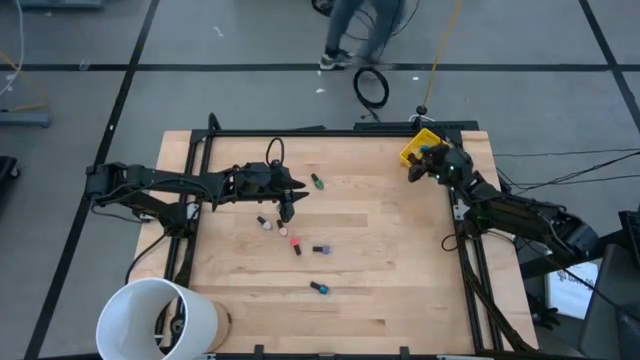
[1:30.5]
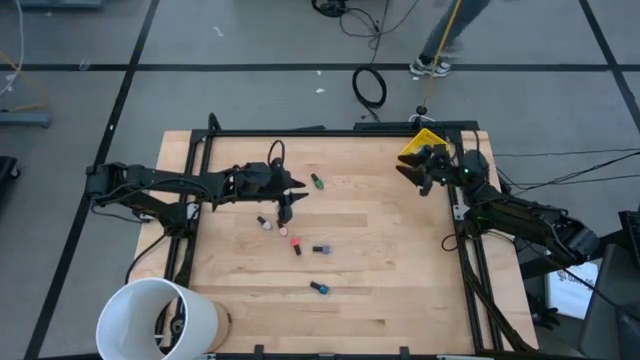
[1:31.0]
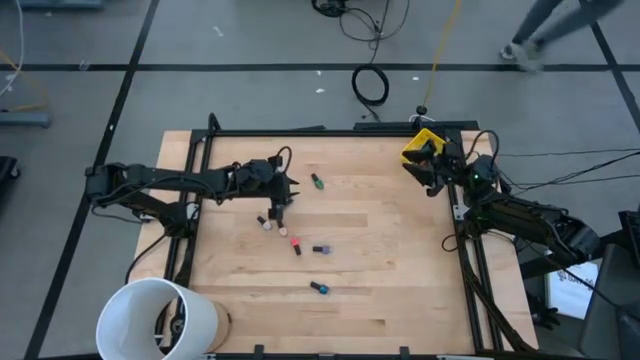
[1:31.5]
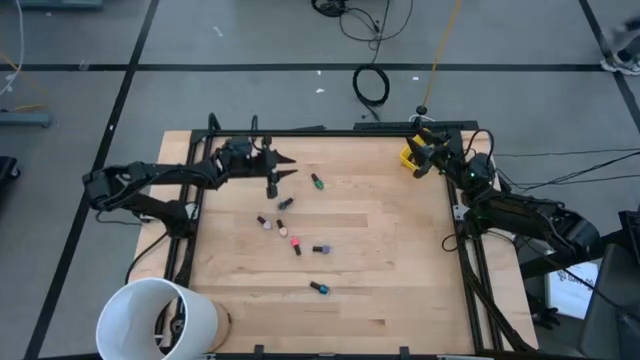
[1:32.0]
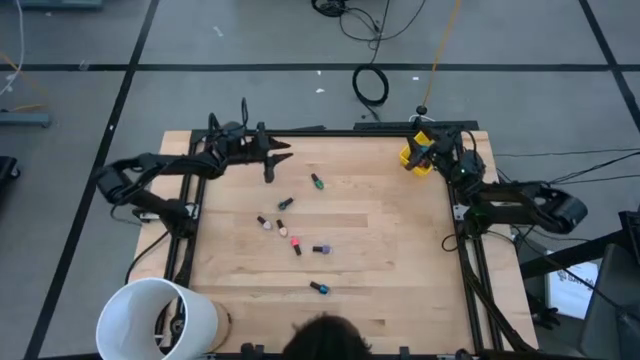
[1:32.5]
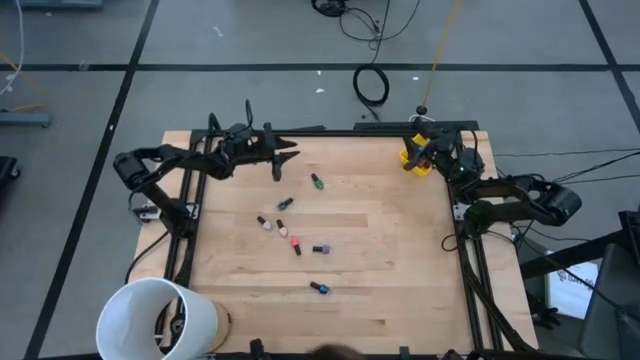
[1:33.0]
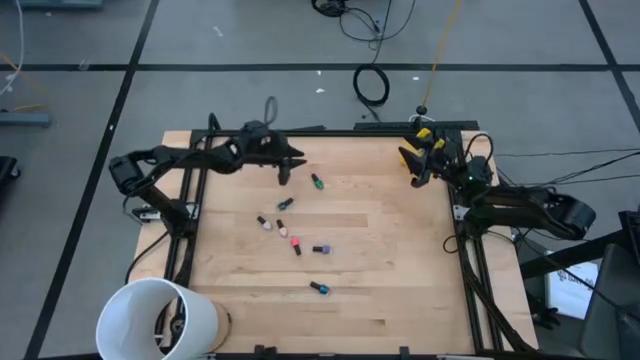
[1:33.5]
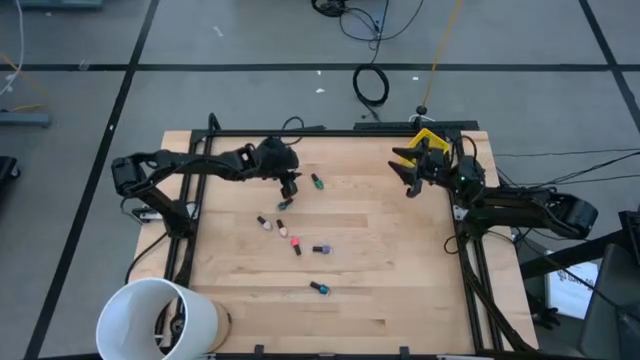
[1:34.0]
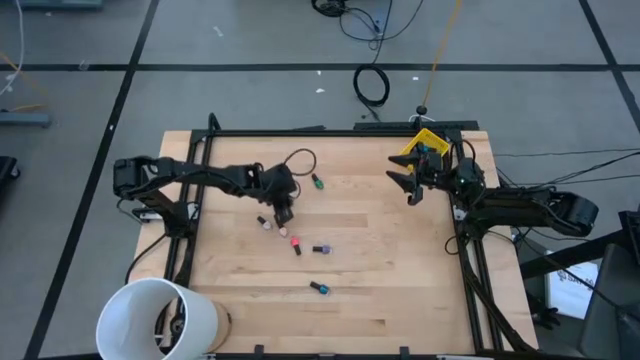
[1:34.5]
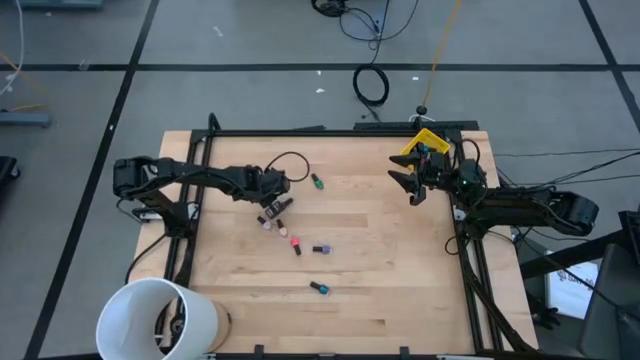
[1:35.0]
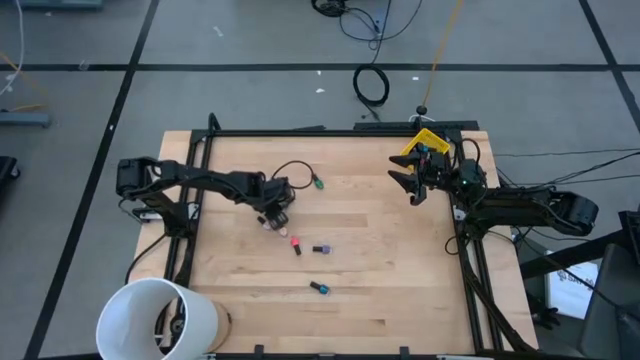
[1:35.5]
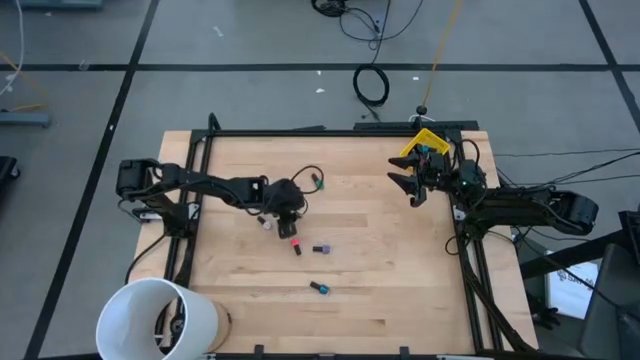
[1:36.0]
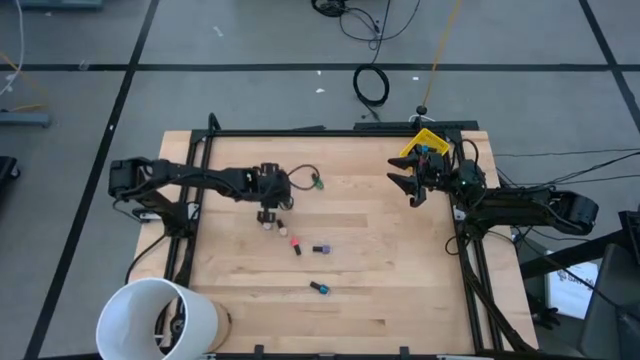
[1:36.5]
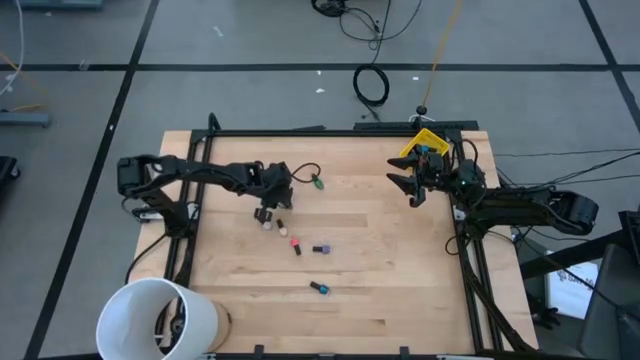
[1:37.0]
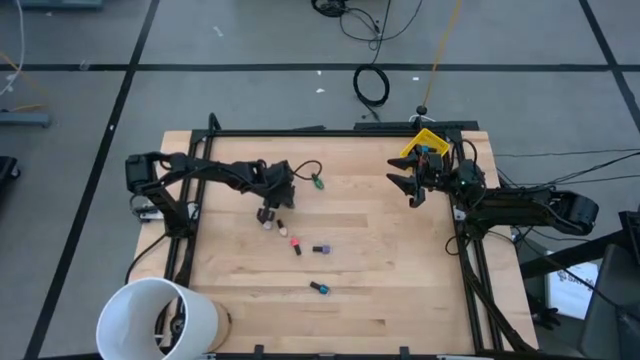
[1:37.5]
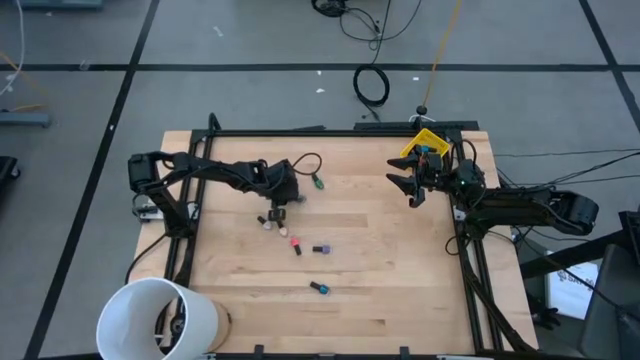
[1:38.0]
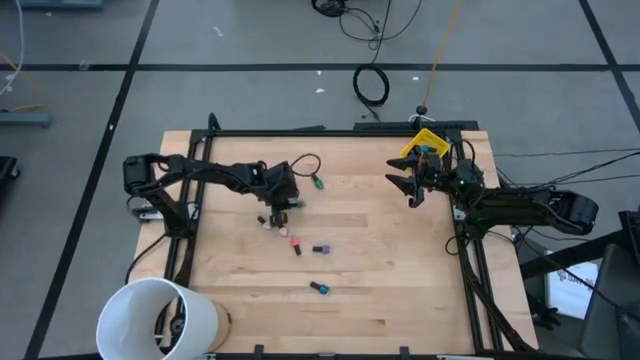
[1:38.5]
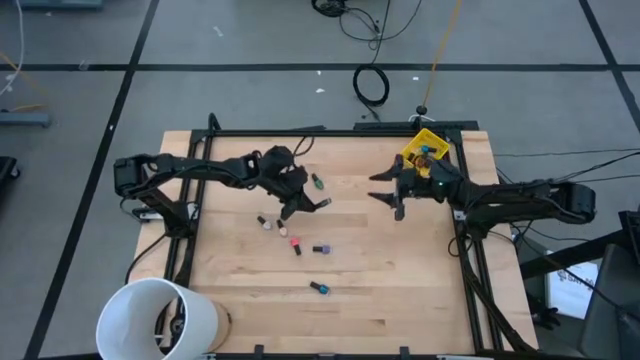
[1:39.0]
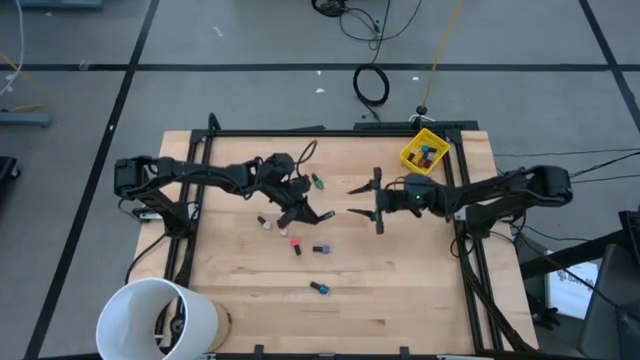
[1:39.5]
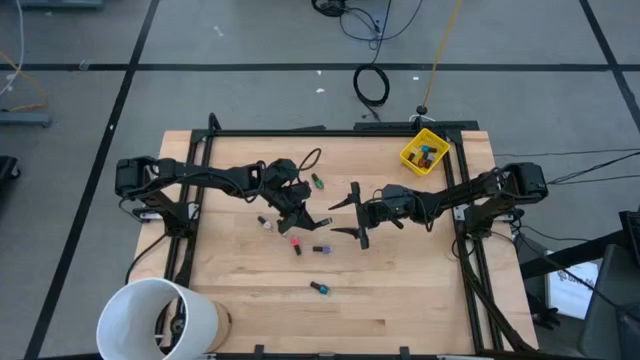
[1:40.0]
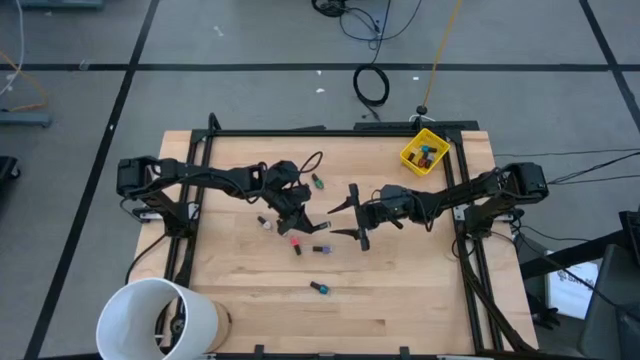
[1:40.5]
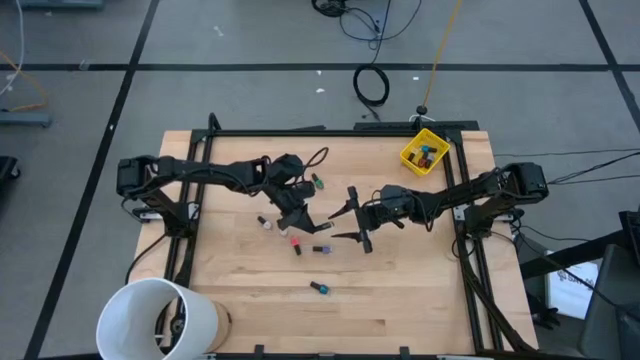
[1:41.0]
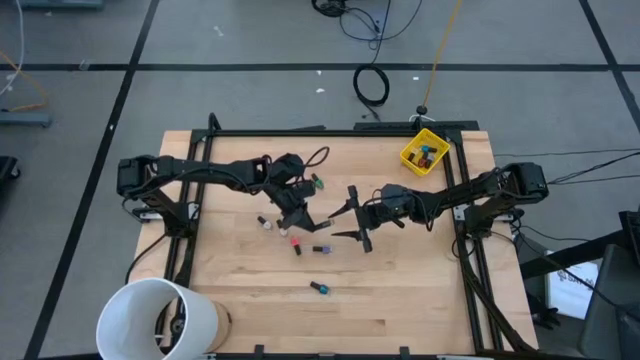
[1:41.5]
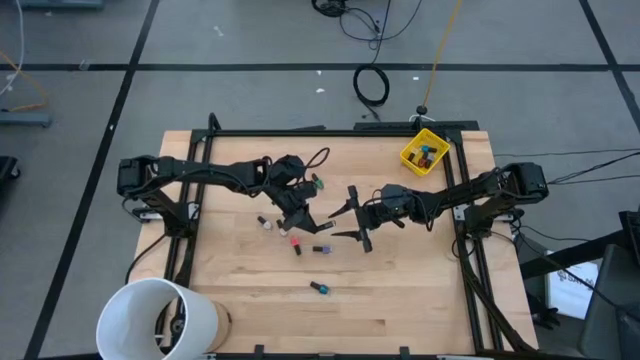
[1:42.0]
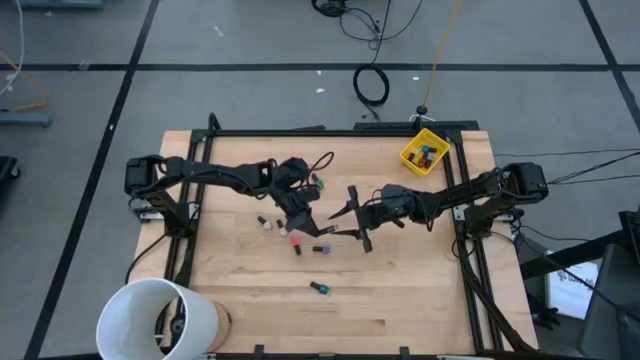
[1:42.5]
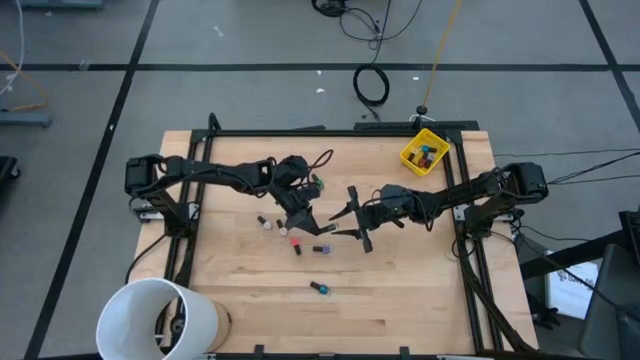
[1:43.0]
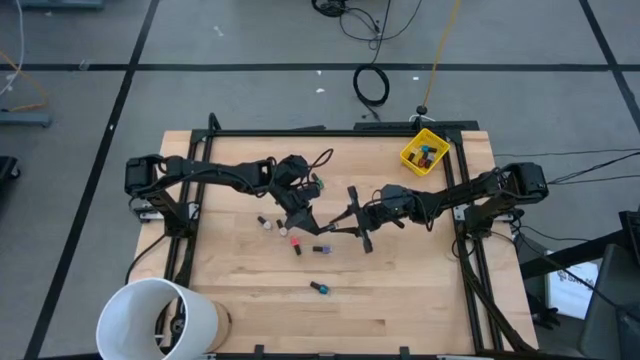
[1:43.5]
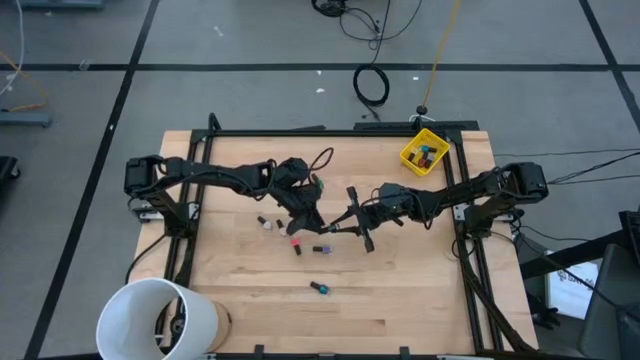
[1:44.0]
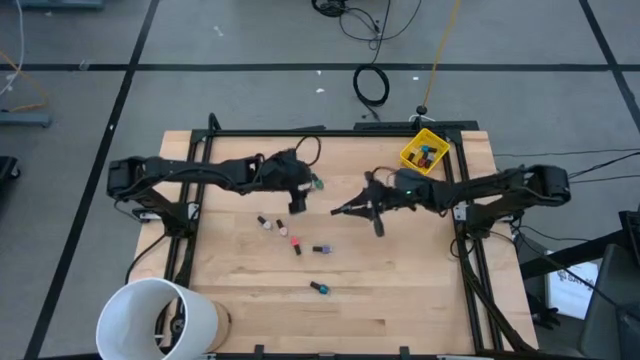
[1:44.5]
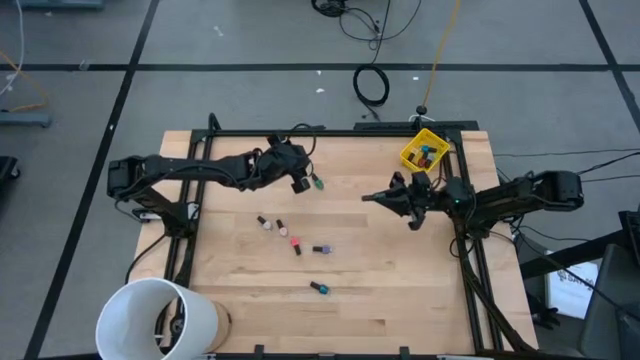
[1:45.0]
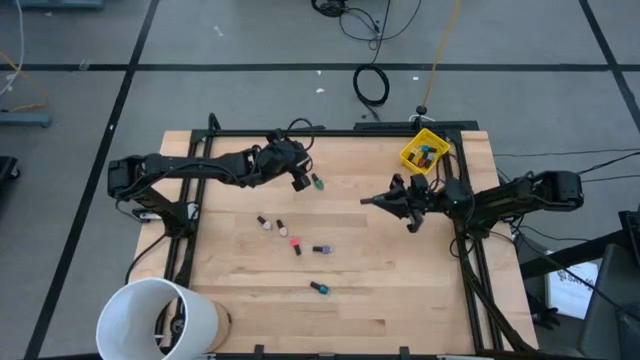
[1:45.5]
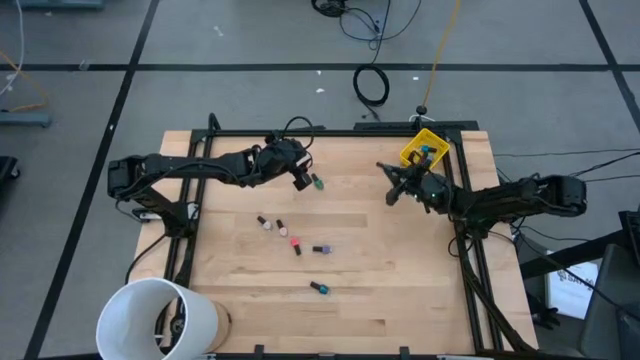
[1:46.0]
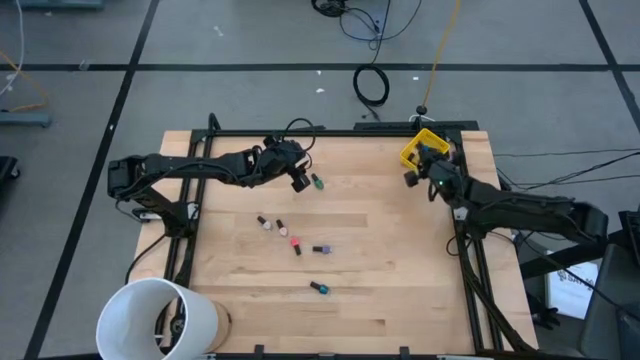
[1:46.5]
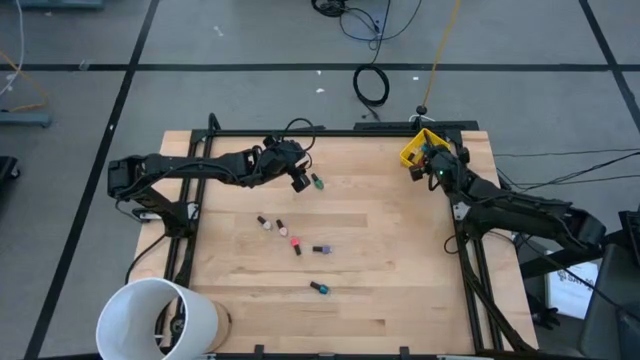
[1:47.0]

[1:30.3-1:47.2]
Task: Pick & Place Nail Polish
Put the dark green nail polish bottle into the yellow bin

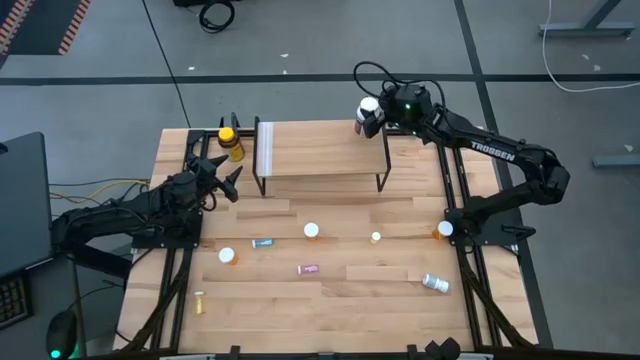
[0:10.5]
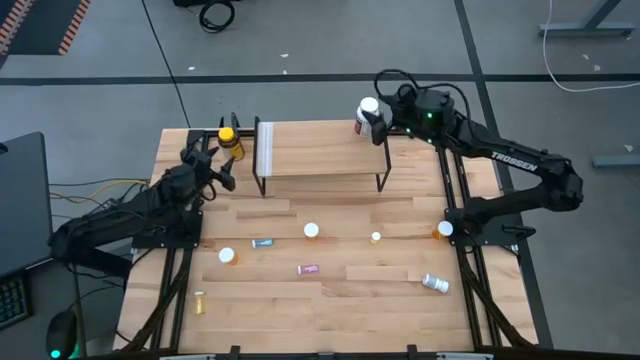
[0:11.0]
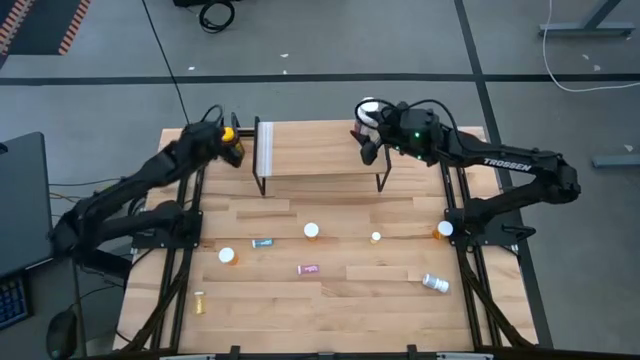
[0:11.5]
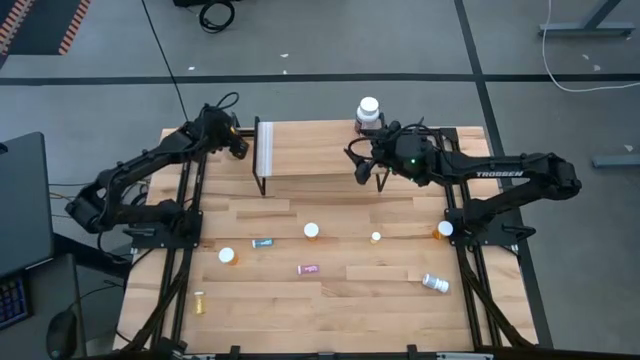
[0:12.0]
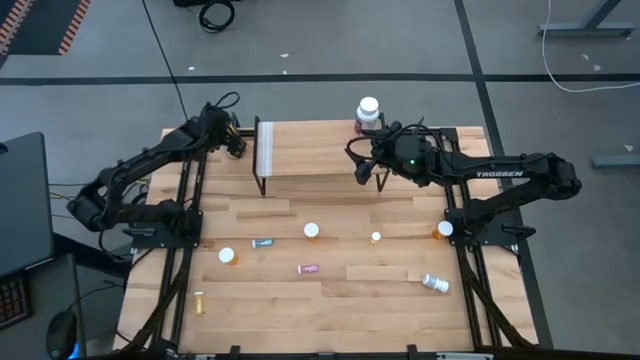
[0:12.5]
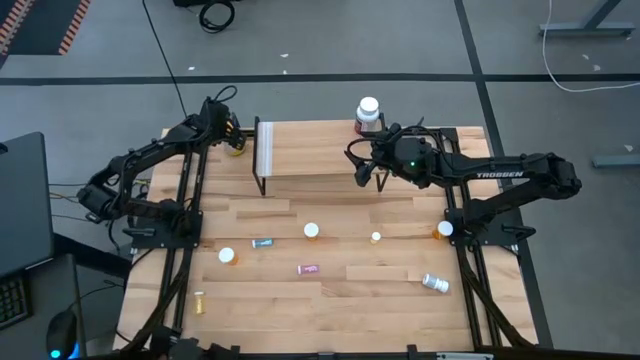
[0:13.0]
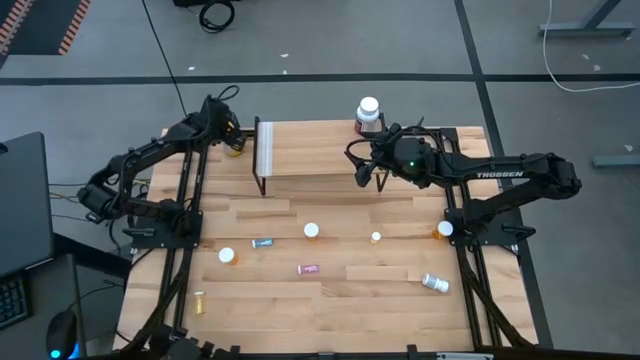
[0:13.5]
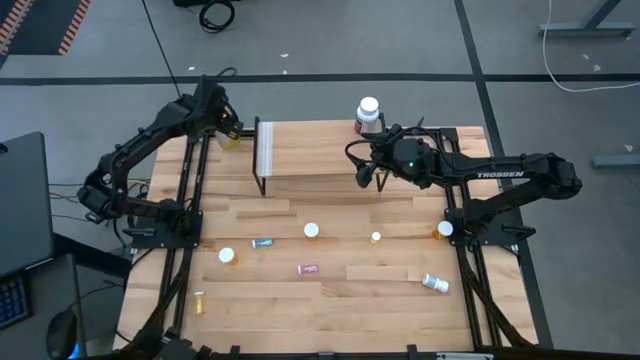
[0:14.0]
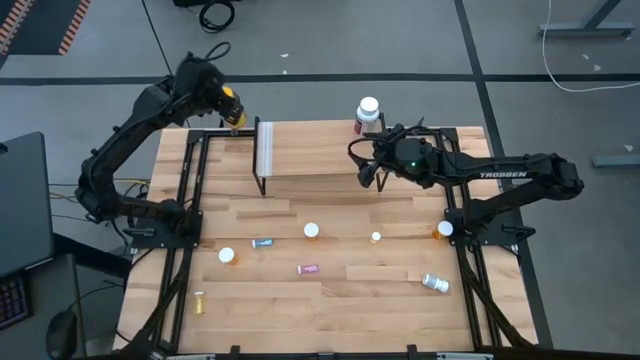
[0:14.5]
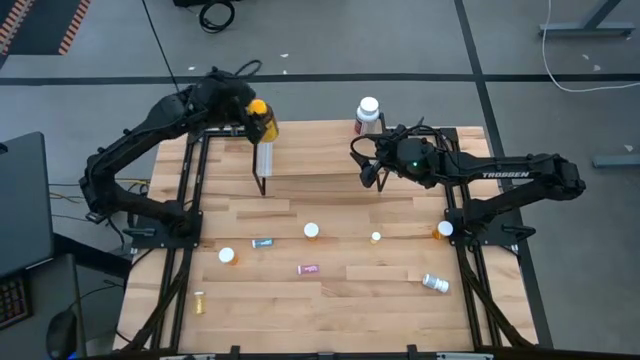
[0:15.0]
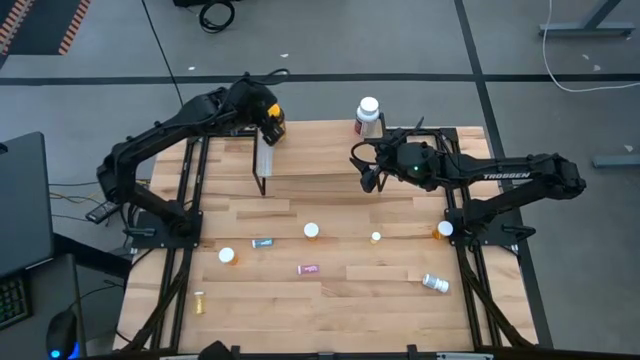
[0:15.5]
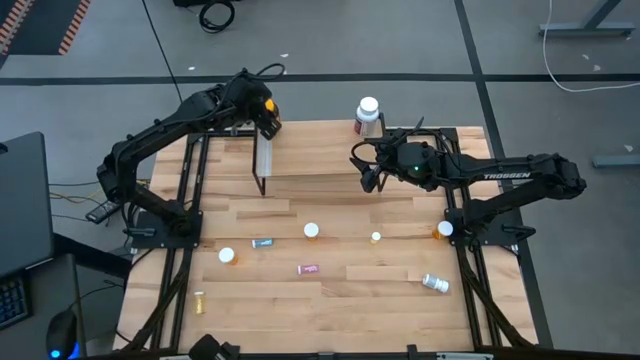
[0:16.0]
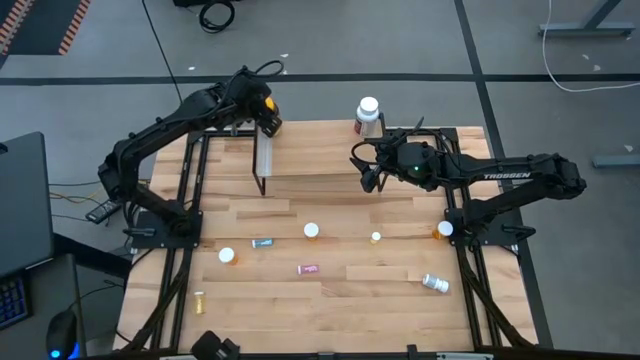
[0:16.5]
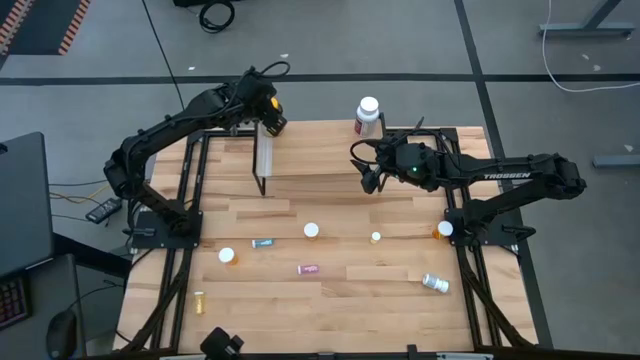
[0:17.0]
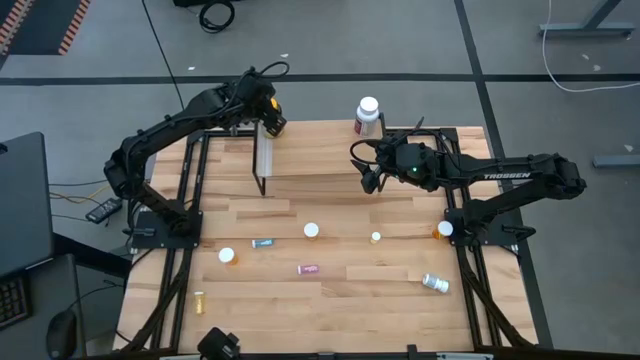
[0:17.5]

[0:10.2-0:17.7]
Task: Pick and place medicine bottles onto shelf by color
Put the large yellow pill bottle on the shelf
